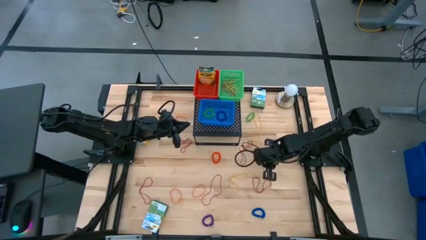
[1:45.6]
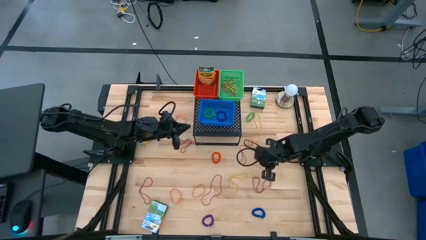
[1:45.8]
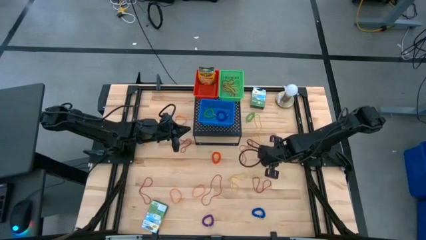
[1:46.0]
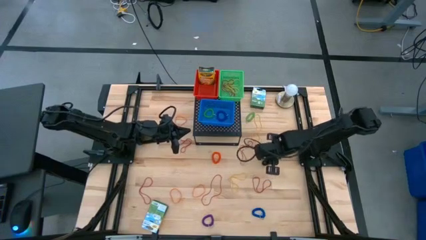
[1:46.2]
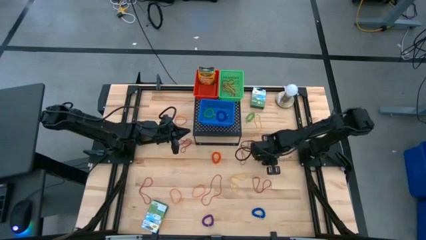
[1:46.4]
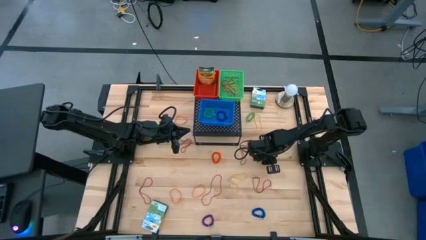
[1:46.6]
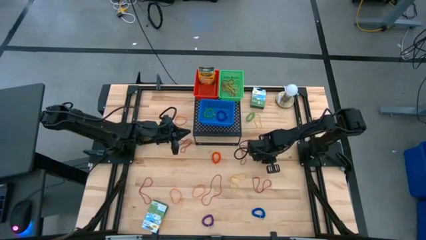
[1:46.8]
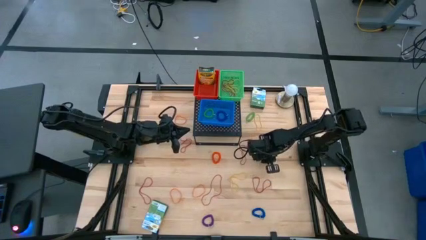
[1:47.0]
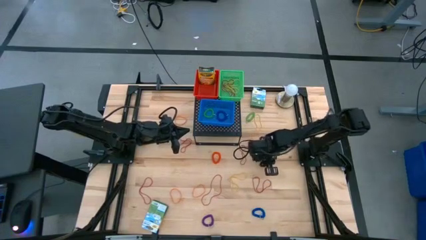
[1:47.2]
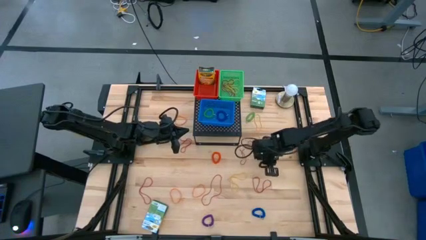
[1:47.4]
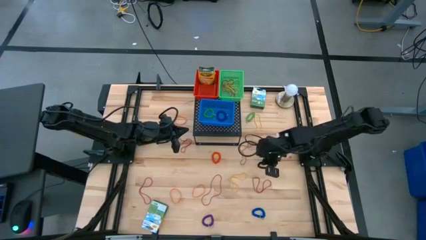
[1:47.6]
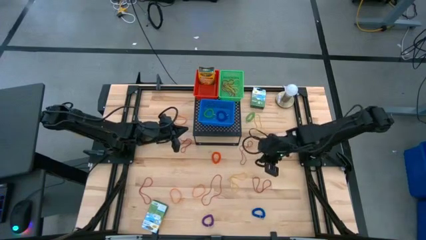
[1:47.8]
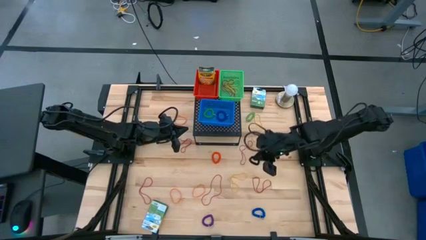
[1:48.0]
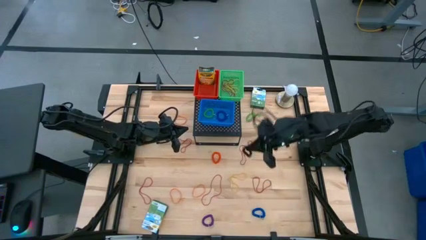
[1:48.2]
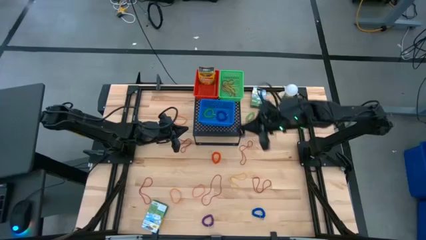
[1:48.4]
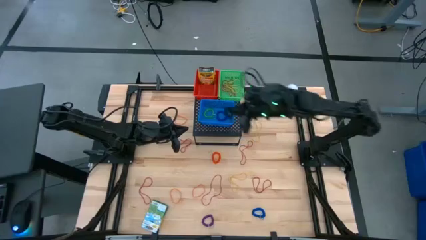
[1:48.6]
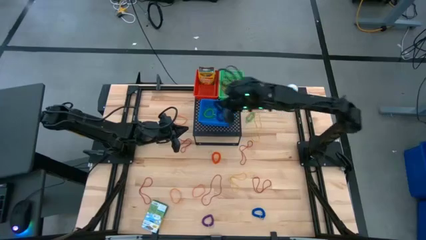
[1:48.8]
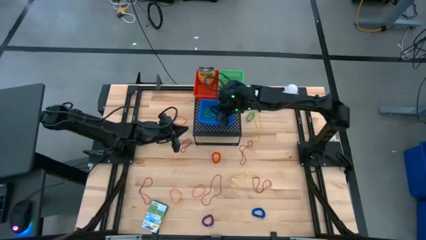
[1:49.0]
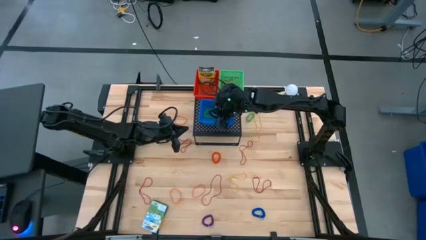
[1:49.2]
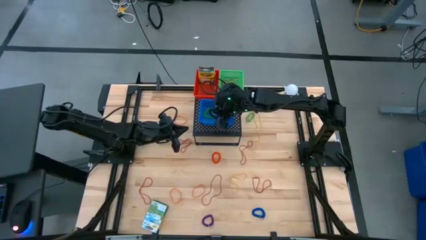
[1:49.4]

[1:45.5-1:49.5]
Task: Pick & Place Office Desk Supplies
Put the black spring keychain into the blue bin on the shelf

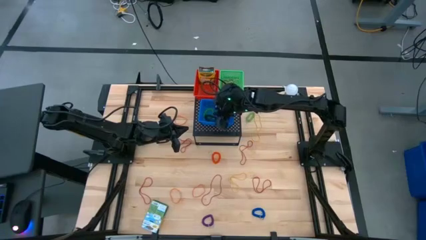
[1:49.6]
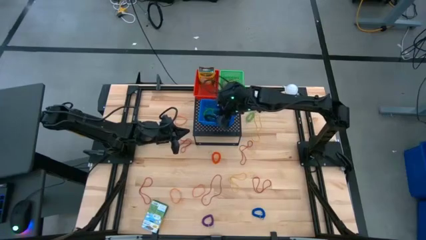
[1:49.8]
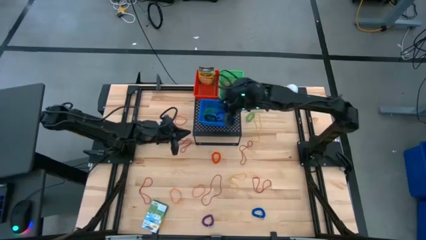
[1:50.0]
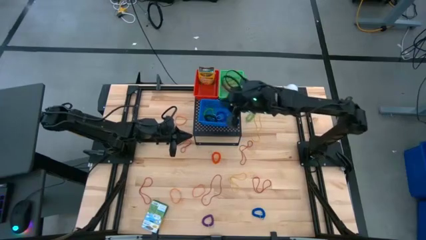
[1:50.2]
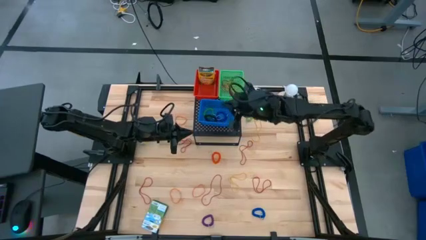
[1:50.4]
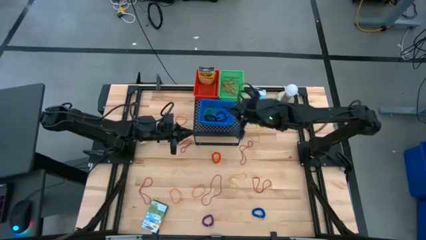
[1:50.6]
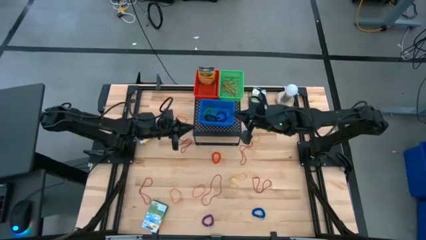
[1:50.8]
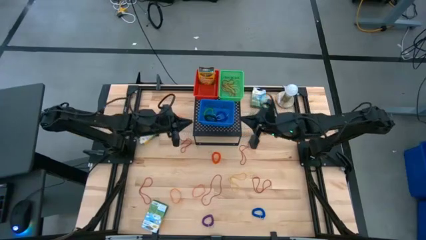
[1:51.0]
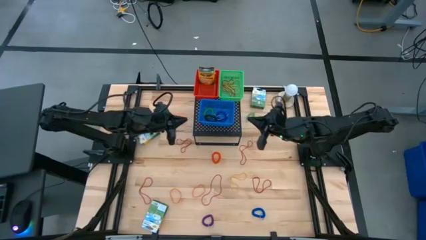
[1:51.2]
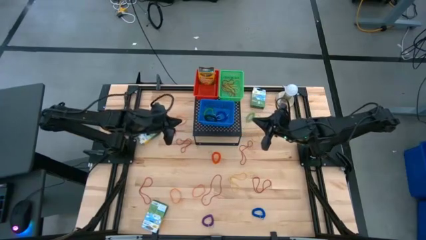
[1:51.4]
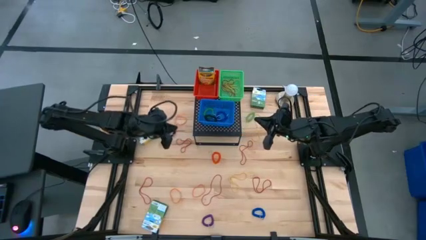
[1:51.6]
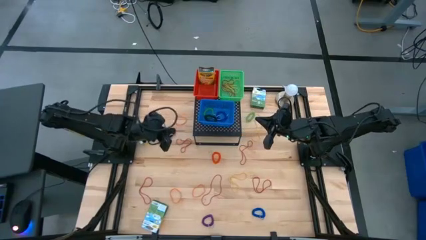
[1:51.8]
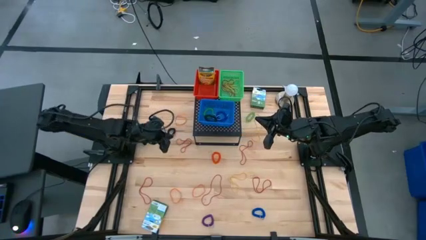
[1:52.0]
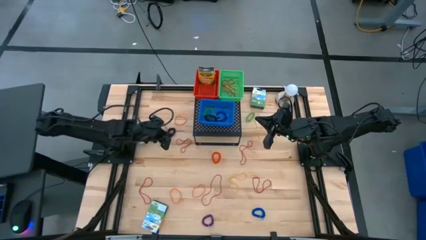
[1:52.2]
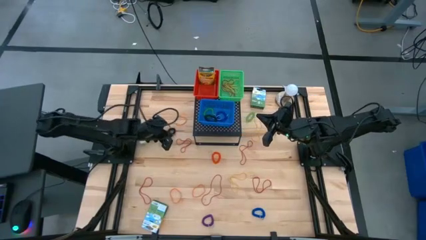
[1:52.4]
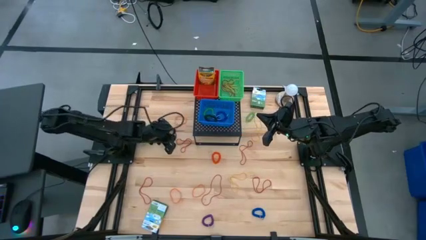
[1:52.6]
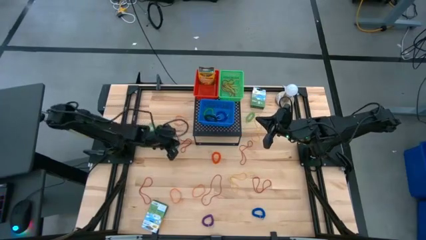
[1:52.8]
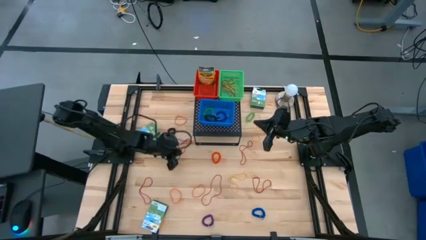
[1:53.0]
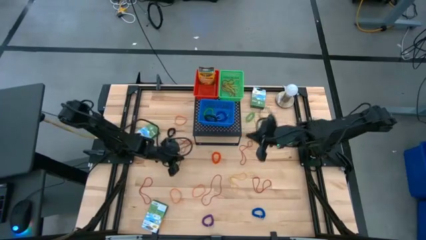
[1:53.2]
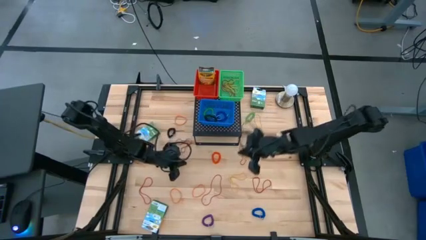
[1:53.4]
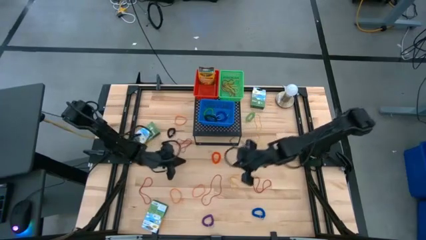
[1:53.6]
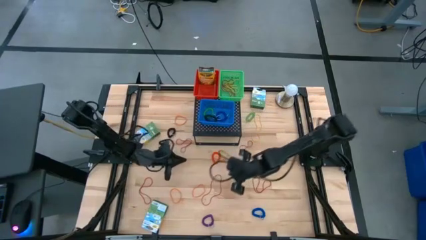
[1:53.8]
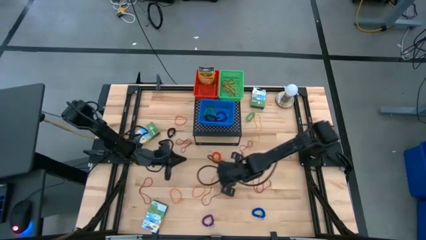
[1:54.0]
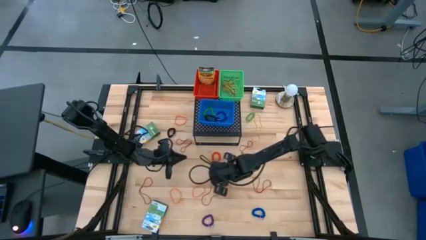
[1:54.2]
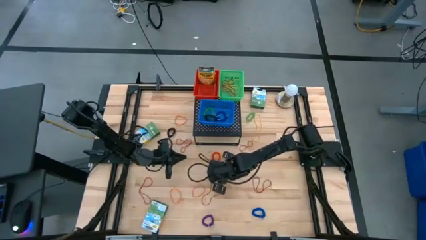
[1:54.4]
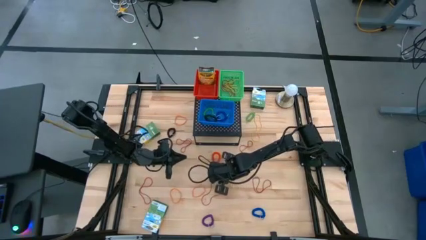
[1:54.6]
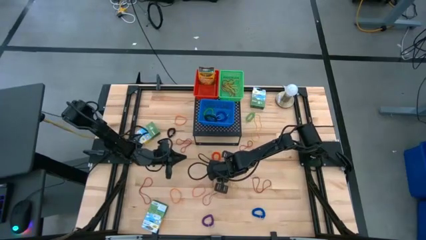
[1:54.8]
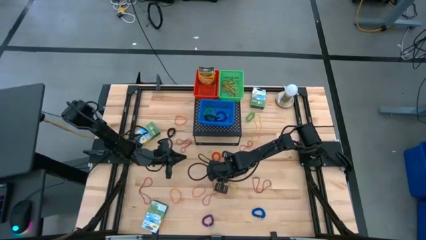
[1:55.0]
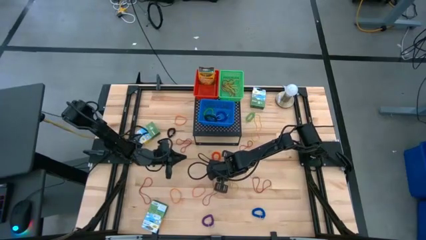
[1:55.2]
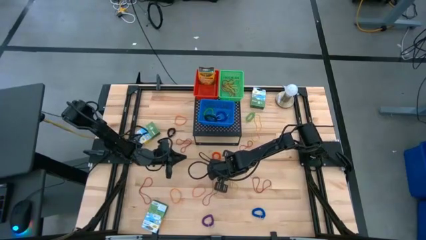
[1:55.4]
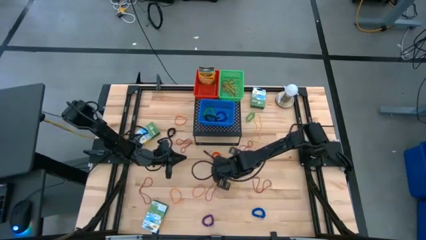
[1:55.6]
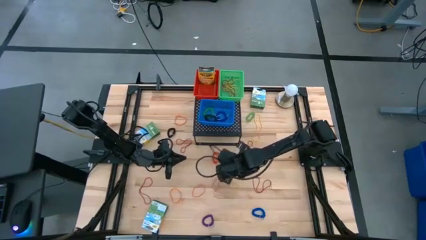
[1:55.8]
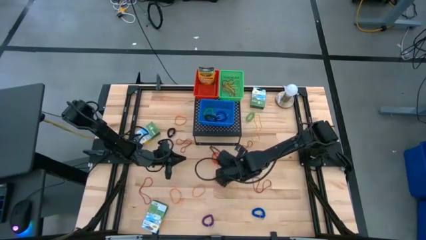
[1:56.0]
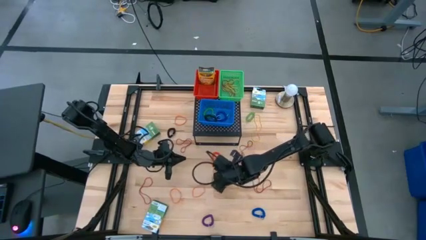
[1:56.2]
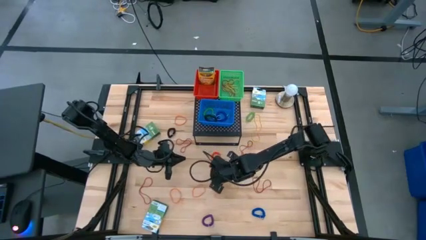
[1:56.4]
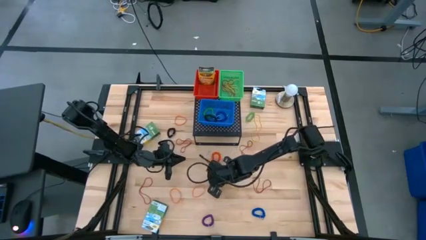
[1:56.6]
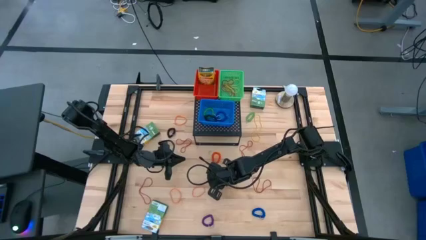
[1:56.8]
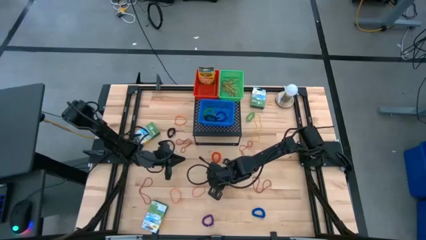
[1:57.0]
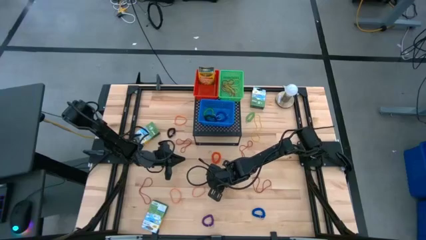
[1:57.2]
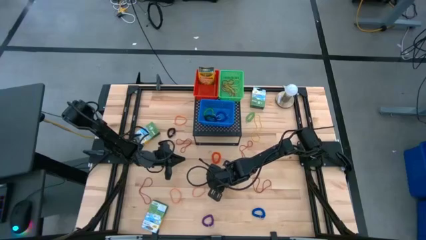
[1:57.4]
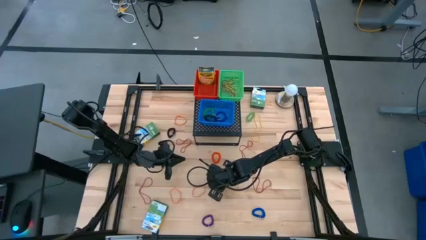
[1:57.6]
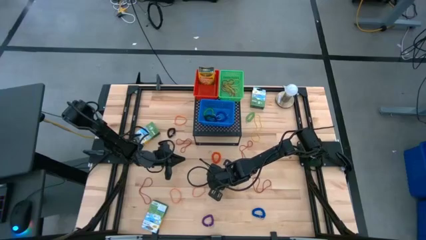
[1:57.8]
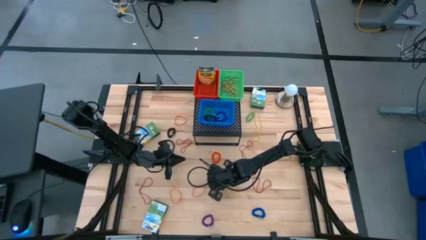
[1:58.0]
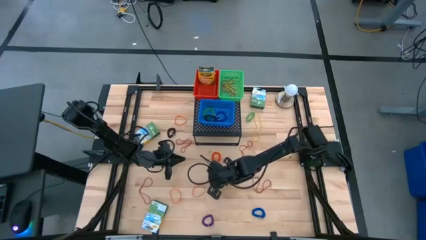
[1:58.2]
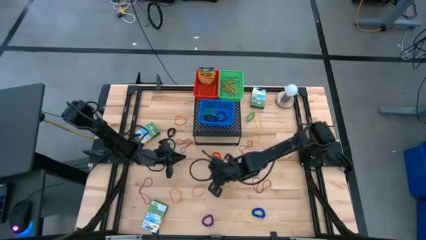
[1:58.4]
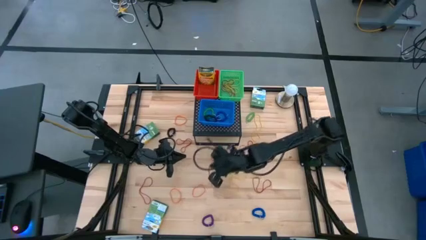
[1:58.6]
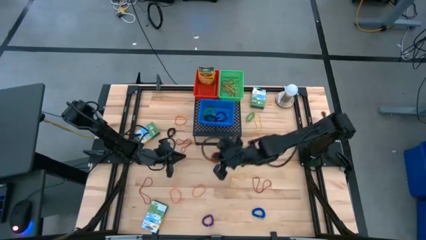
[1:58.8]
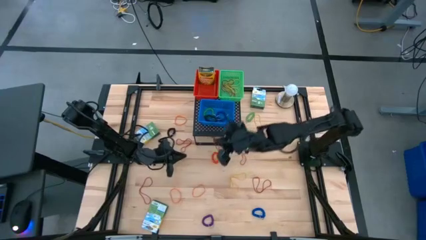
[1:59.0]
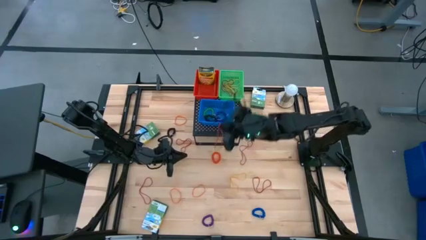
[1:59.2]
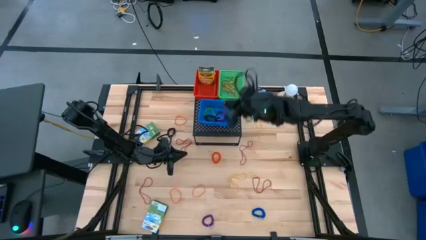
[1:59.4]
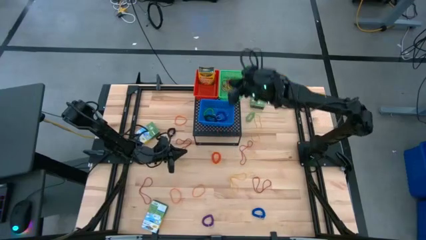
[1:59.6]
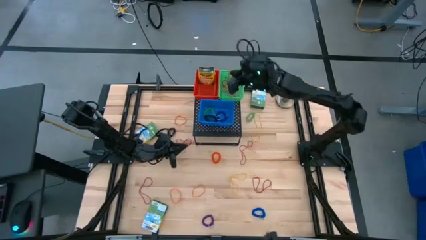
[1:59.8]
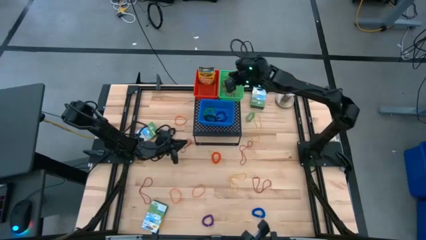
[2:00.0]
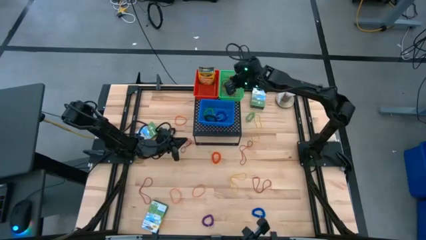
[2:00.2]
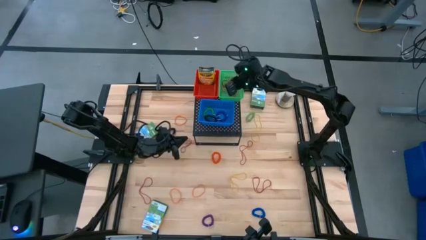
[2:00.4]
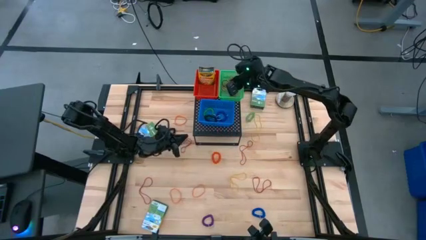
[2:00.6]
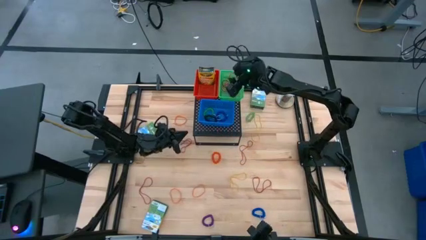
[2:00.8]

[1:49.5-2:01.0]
Put the red rubber band into the green bin on the shelf

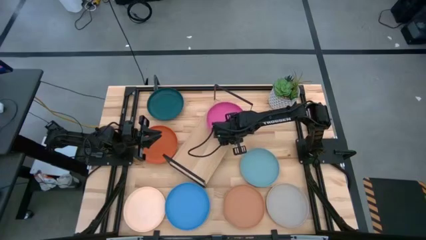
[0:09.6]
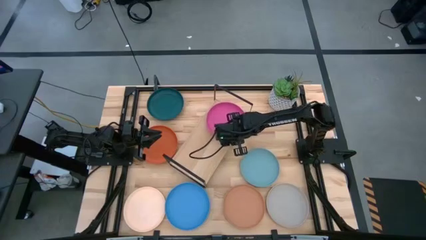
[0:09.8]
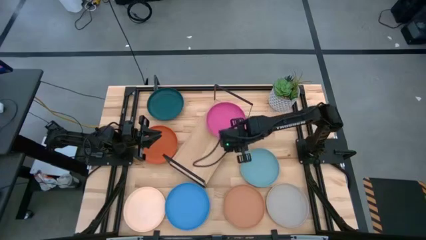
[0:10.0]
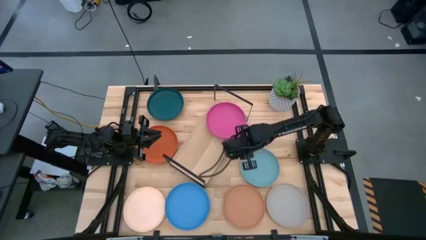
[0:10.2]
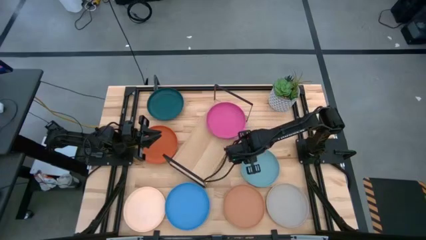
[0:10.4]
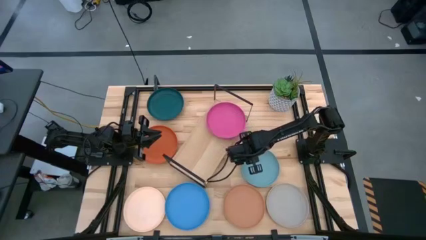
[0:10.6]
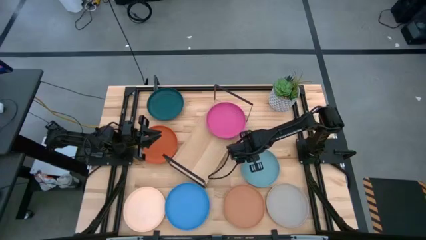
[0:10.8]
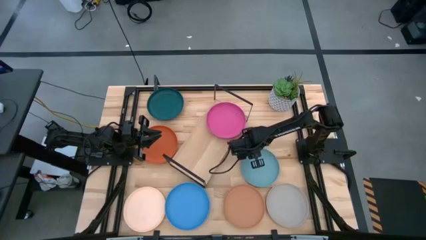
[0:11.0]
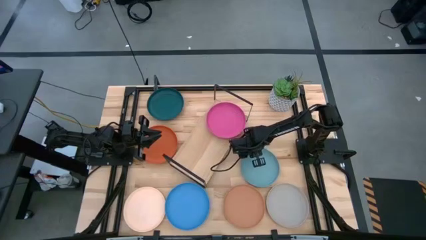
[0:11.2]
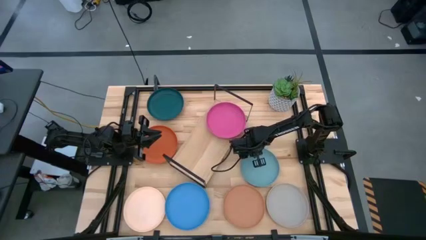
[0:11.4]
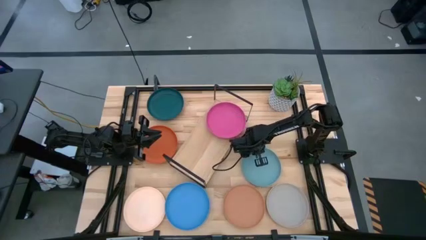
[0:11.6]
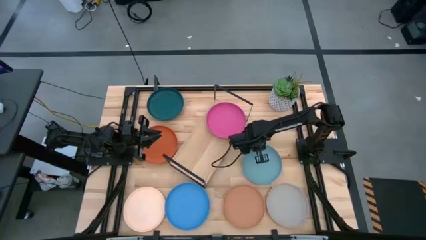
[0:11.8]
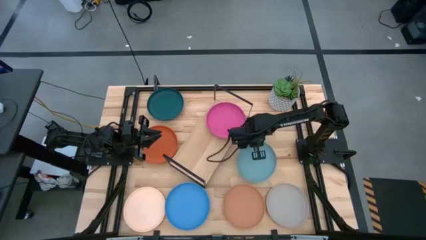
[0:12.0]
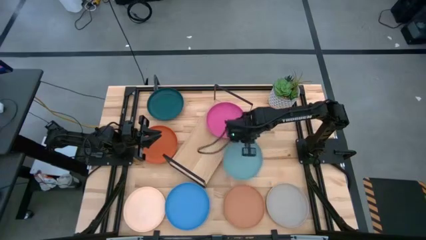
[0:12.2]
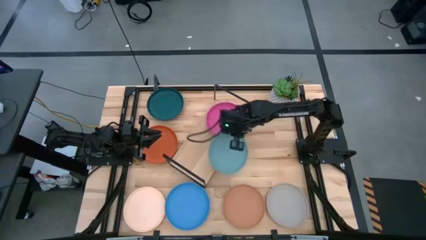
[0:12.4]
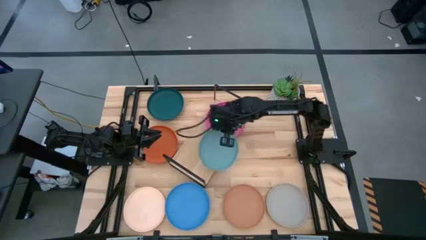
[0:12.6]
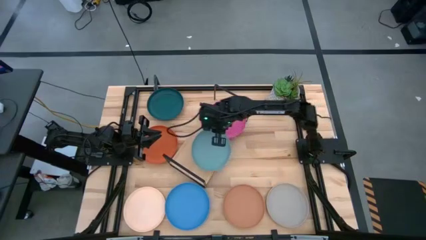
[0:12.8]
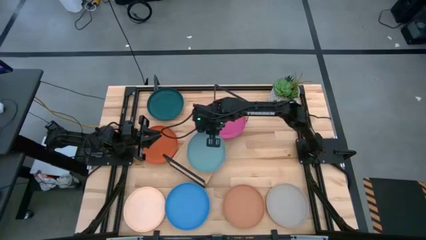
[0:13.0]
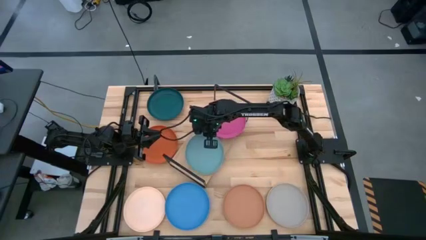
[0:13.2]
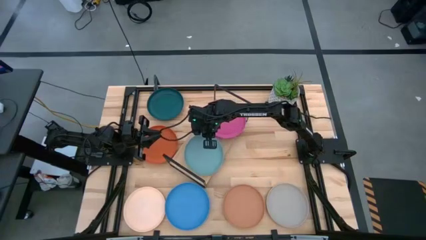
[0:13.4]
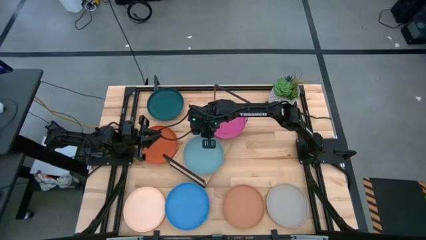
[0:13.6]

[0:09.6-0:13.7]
Task: Place and stack plates onto a shelf
Put the light blue plate on the shelf
